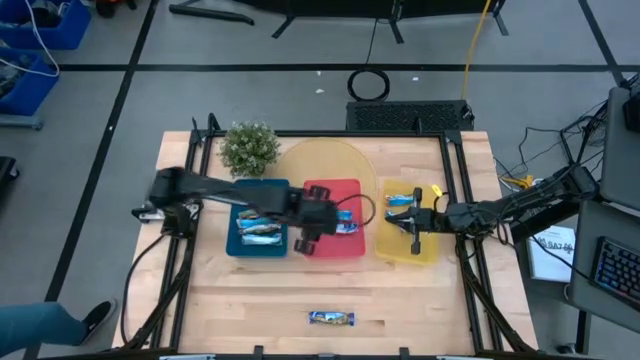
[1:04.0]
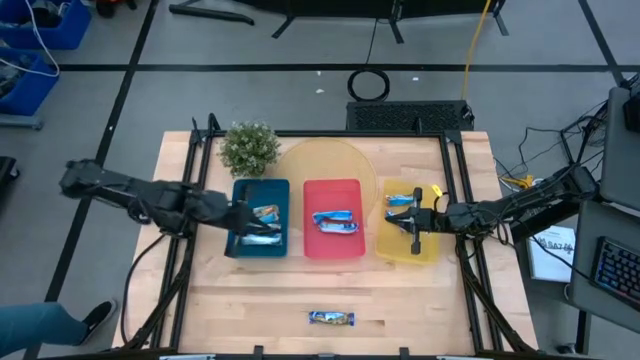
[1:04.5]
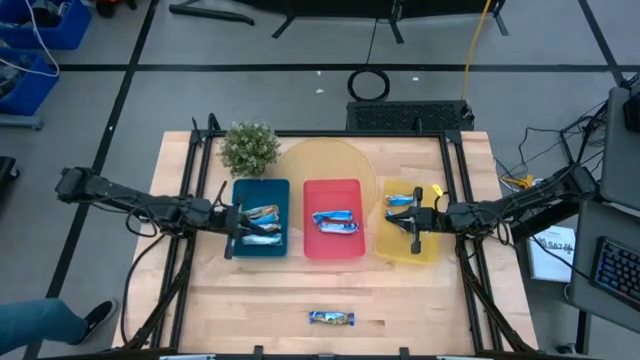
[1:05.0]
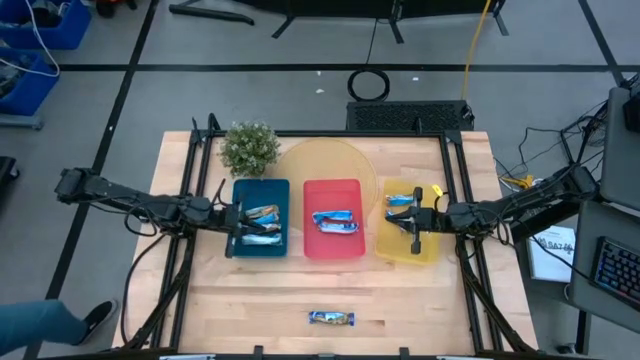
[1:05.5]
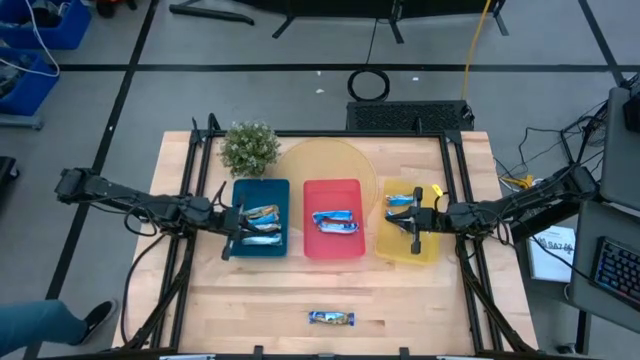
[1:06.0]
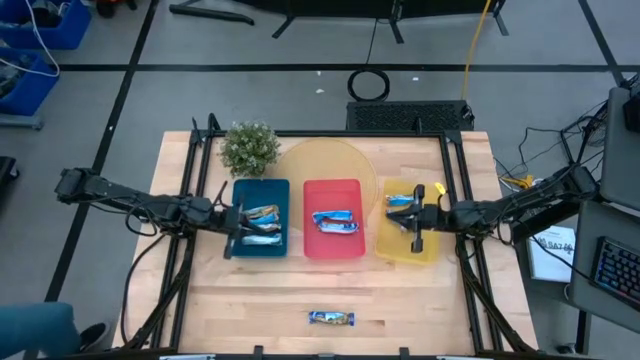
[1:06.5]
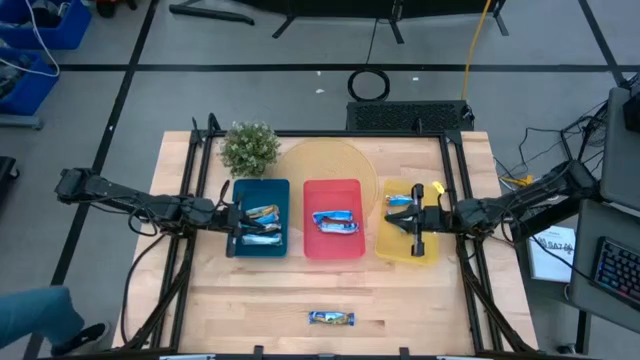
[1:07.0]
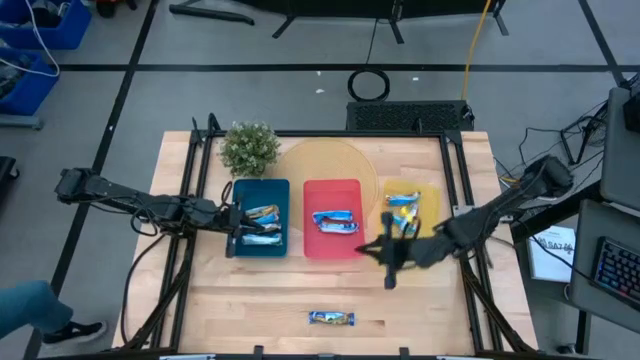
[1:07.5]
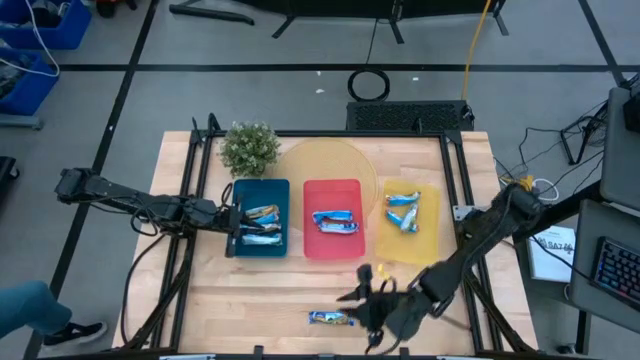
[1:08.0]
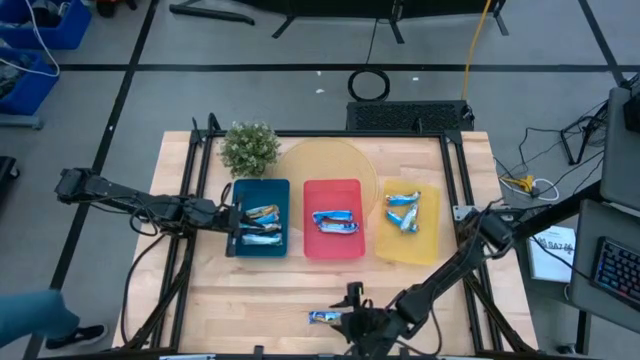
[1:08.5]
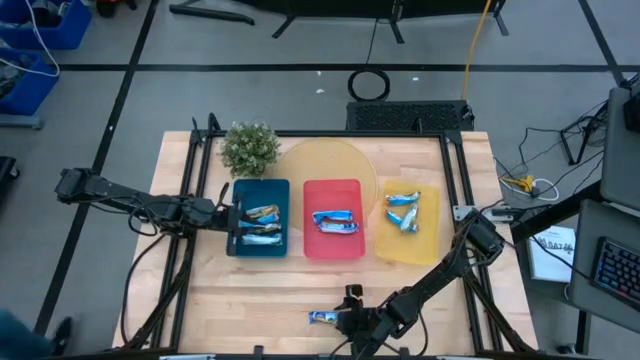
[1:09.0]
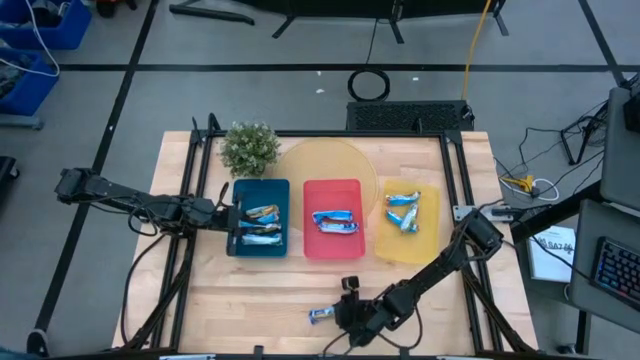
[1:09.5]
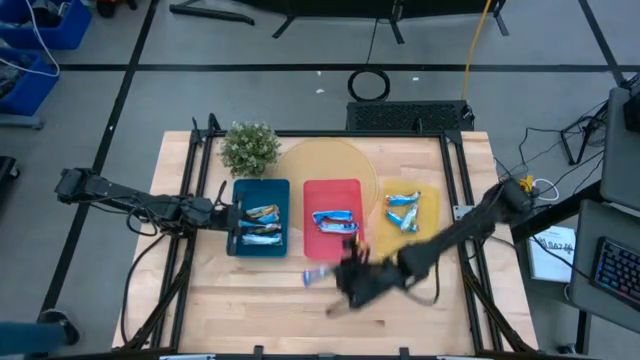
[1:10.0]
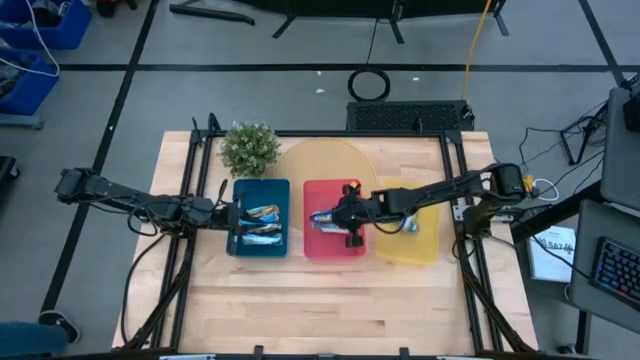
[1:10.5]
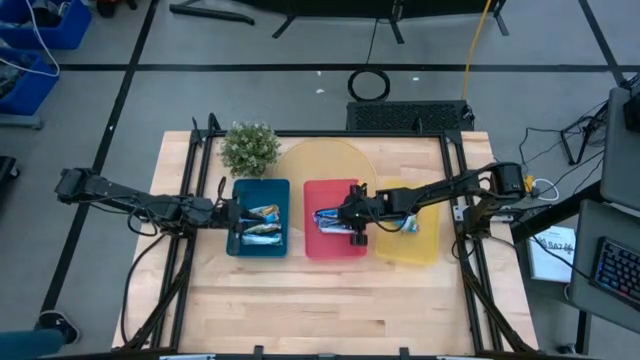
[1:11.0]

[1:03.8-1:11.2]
Task: Pick and place Granola Bars by type
Put the blue granola bar into the red bin

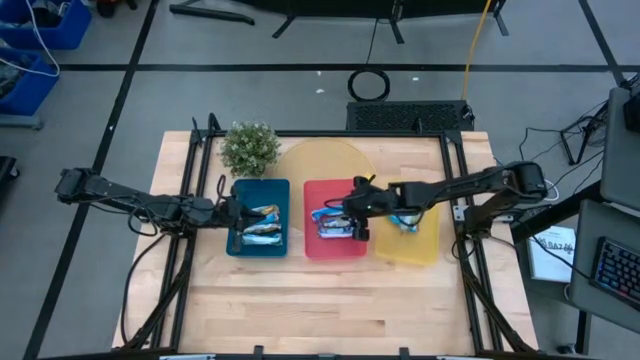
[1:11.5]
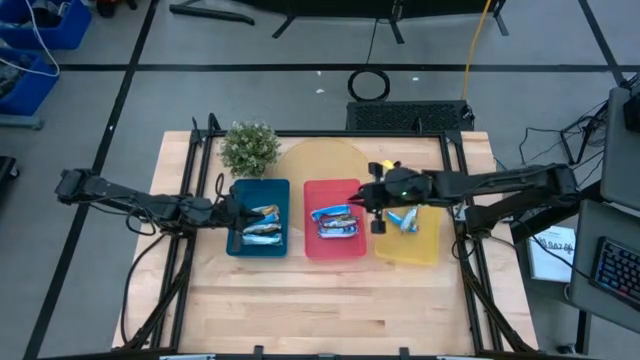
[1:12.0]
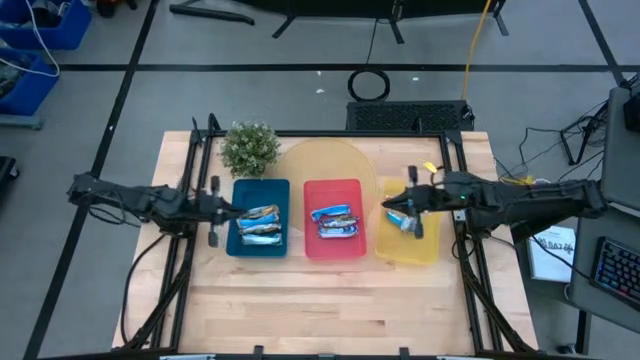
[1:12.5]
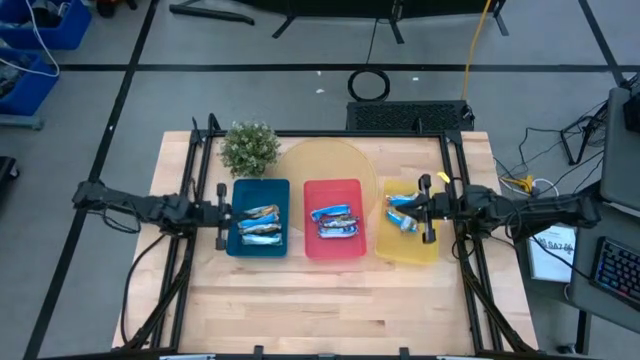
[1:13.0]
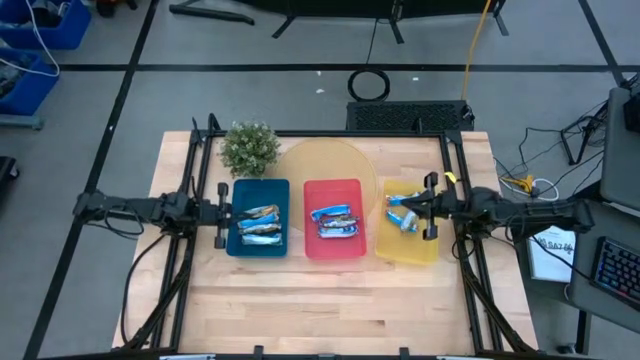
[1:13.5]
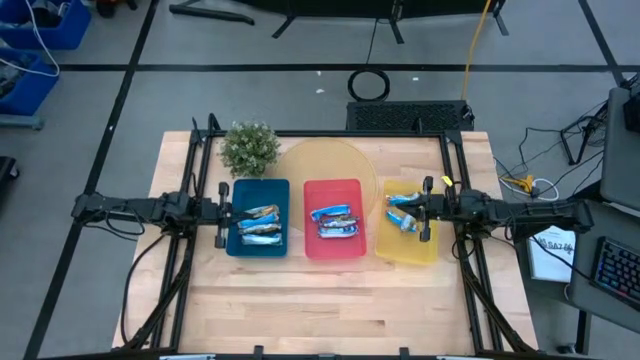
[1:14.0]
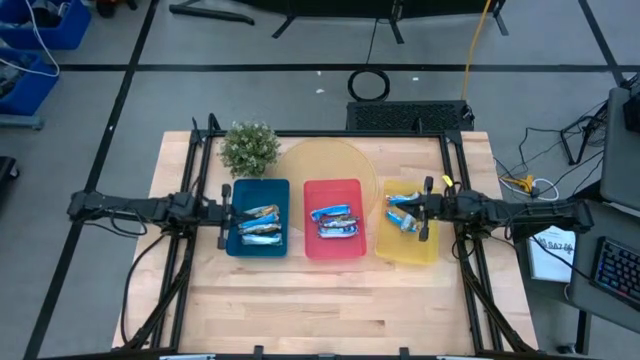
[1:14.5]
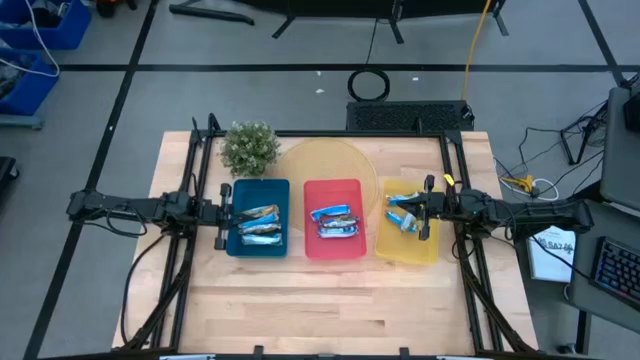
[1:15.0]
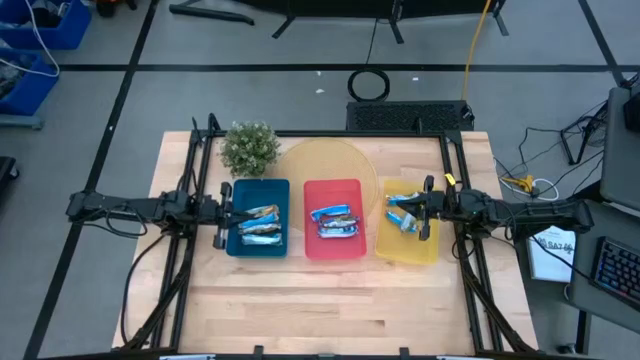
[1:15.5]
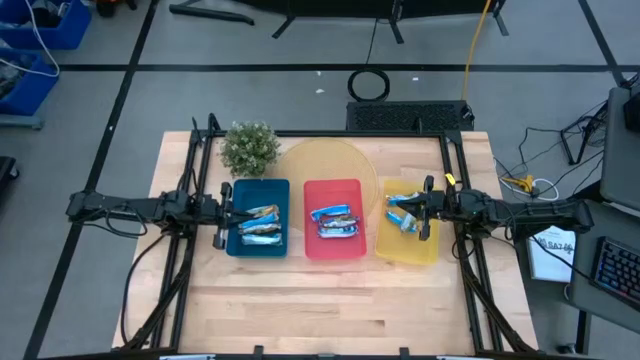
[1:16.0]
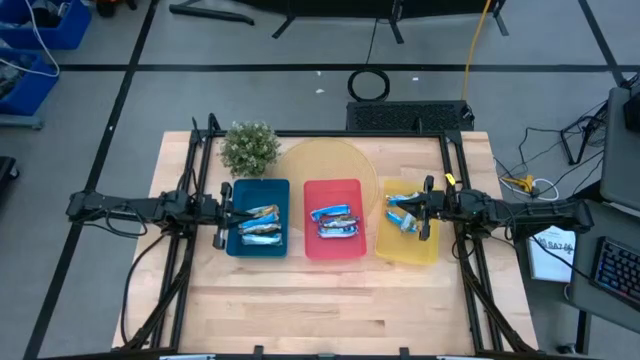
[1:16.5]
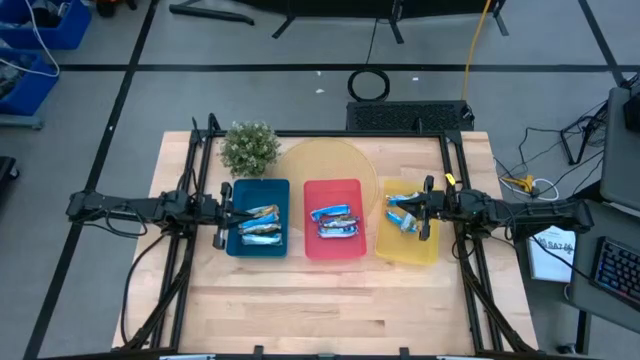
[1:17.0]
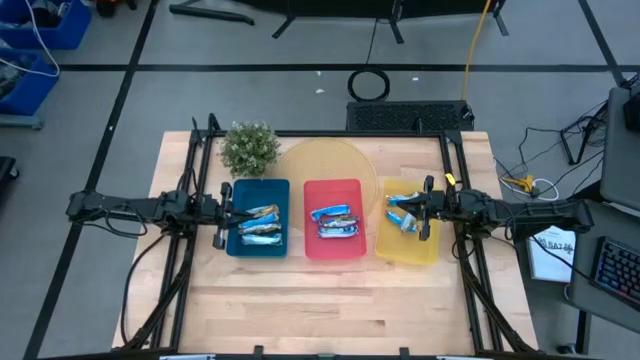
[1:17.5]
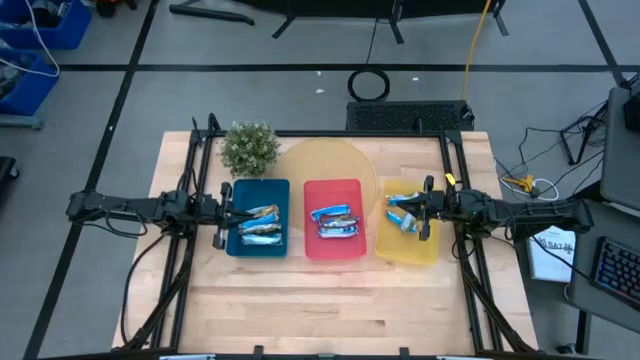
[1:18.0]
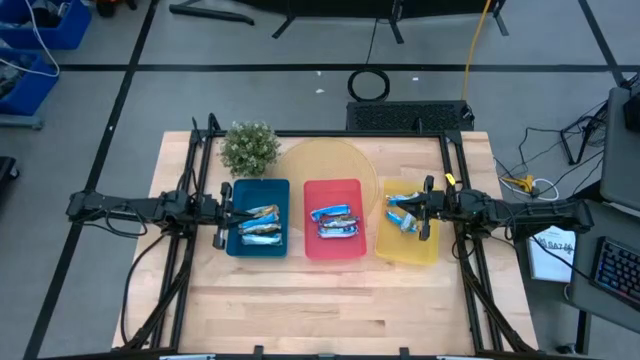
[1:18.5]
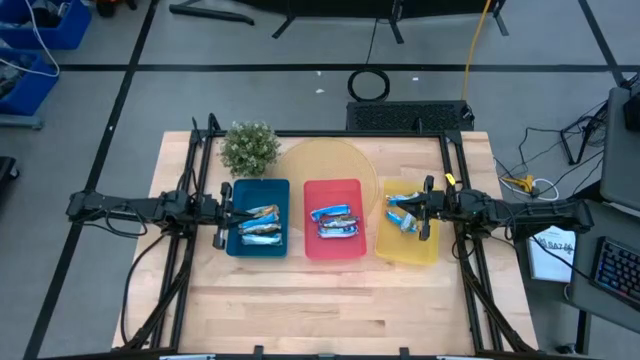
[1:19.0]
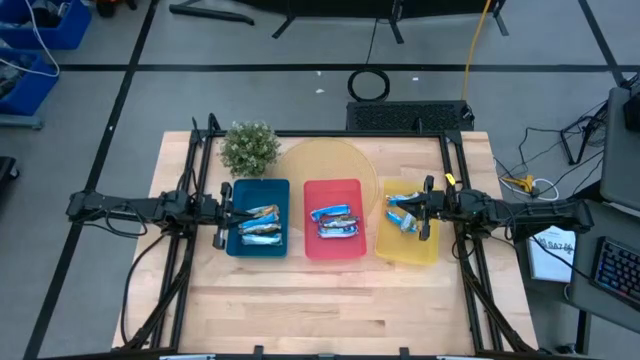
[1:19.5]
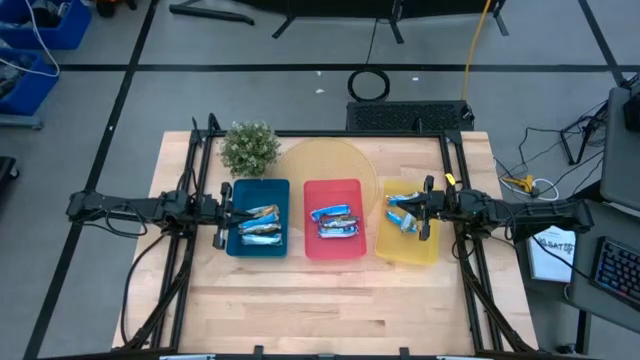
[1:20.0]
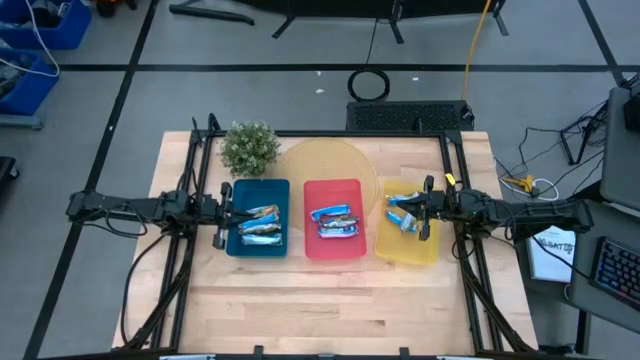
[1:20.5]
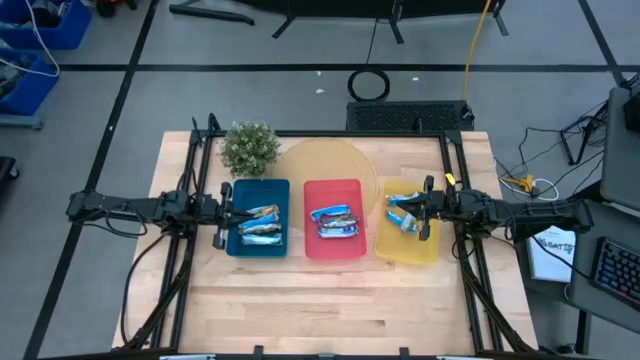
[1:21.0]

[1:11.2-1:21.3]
Return to Home Position

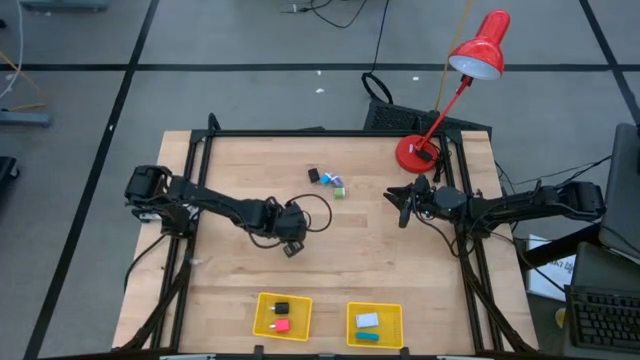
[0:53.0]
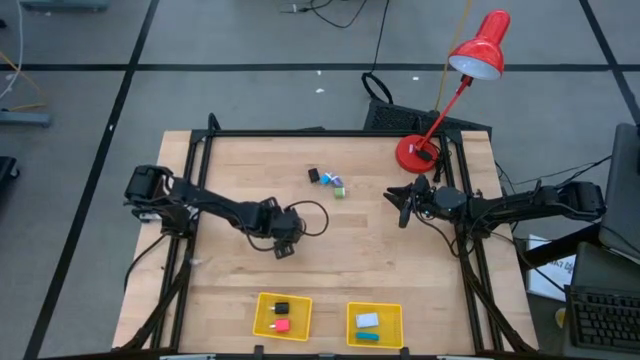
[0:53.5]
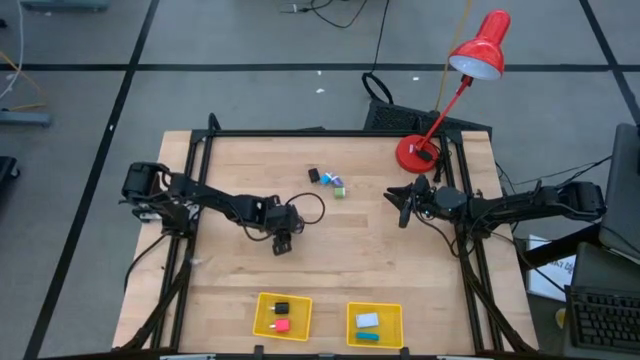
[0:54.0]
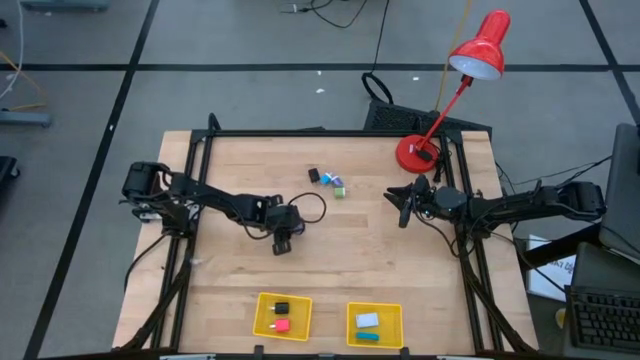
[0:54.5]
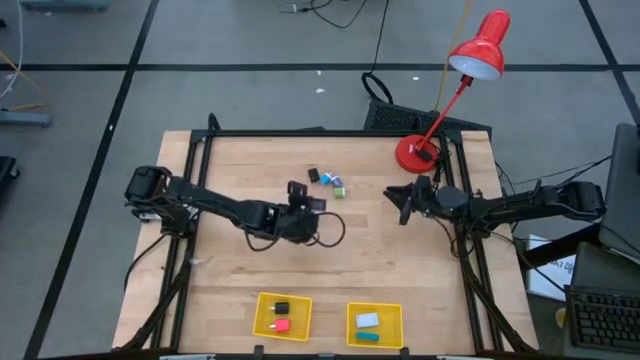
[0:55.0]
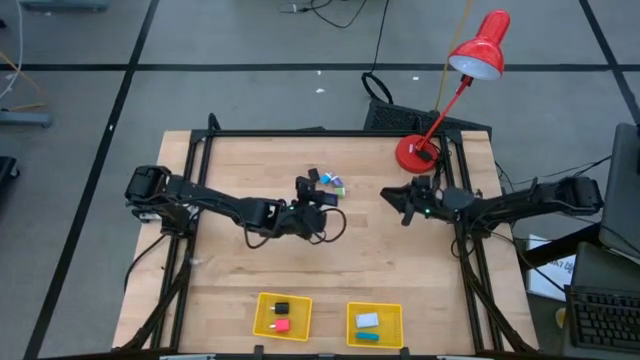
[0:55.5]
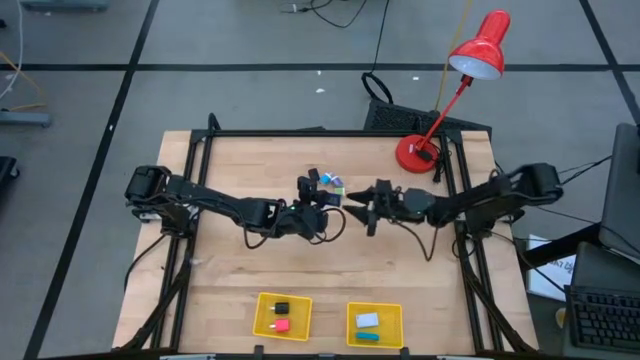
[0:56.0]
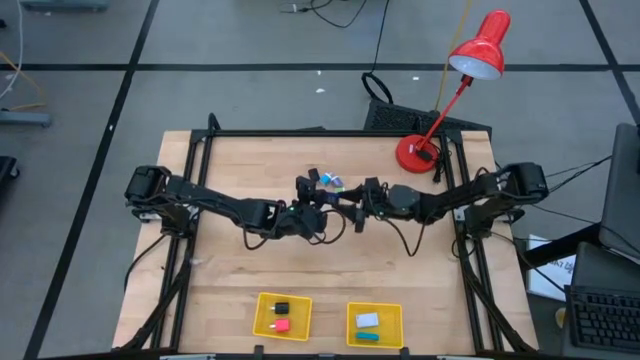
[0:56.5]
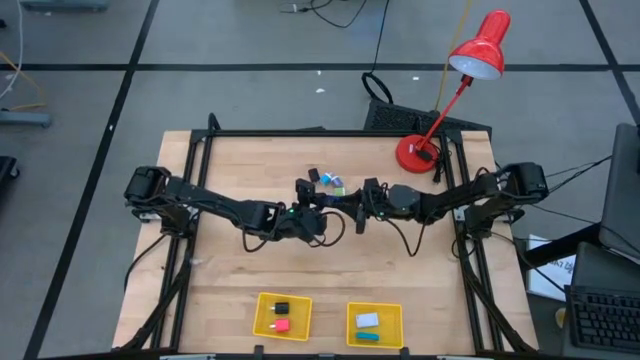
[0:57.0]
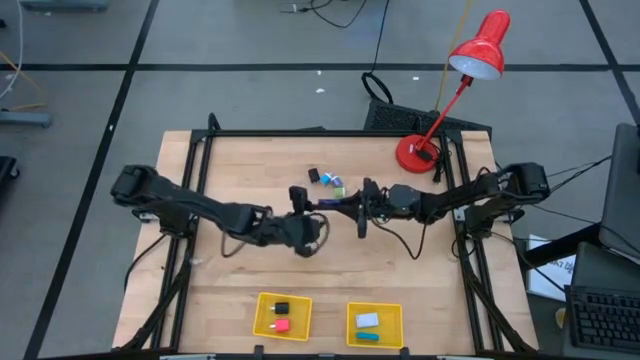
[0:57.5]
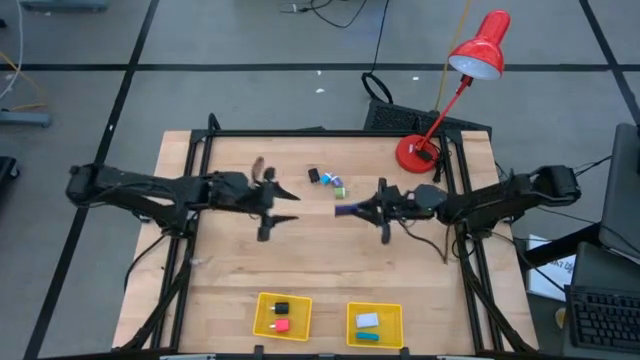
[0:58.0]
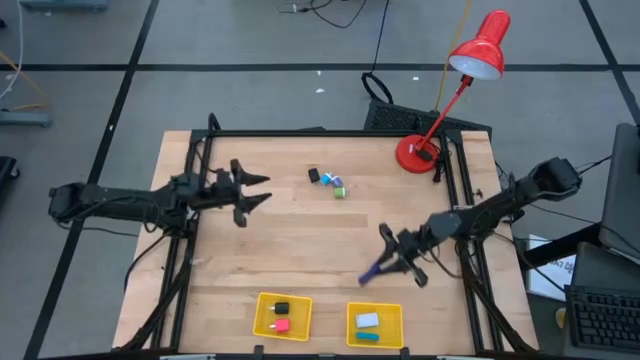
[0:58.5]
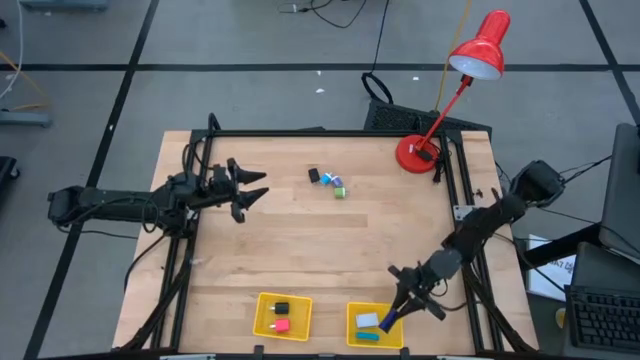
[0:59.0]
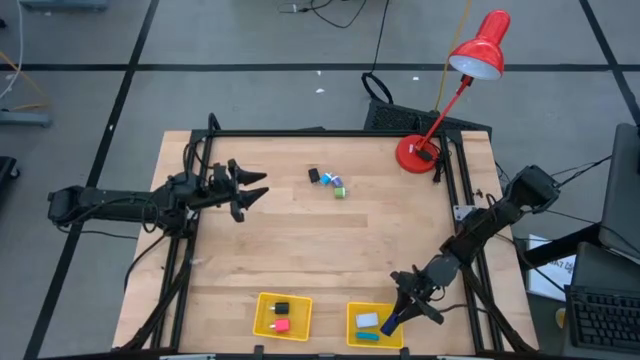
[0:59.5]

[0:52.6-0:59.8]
Task: Pick & Place Office items
Put the light blue digital clock into the right yellow bin
